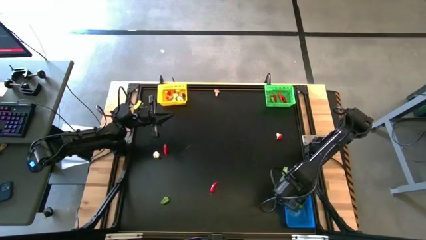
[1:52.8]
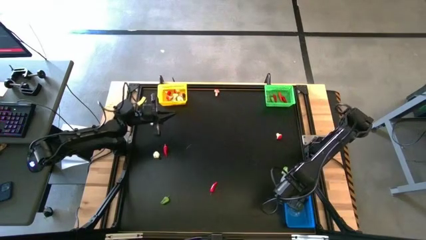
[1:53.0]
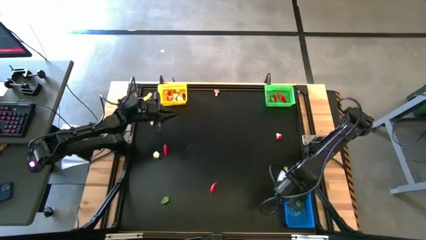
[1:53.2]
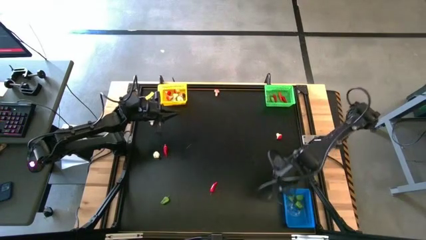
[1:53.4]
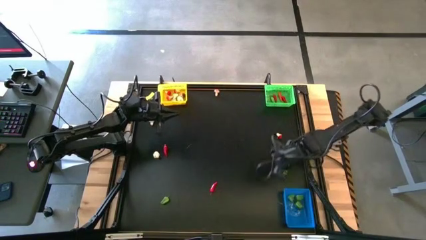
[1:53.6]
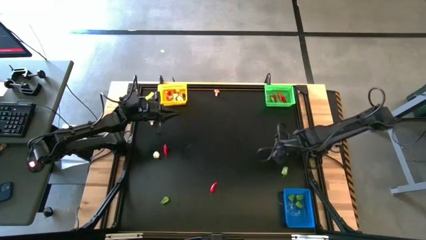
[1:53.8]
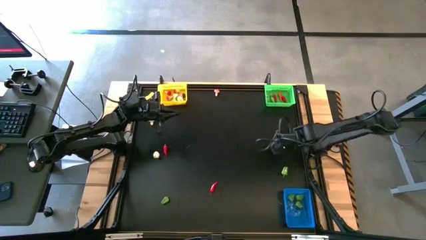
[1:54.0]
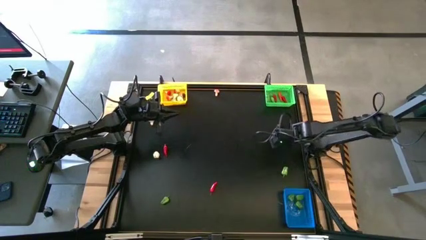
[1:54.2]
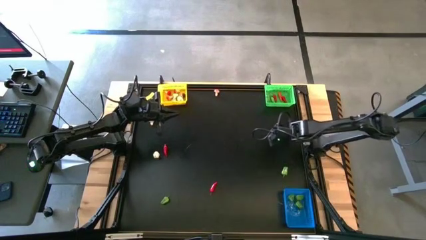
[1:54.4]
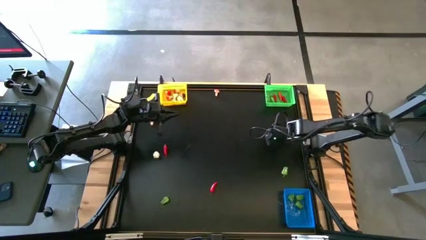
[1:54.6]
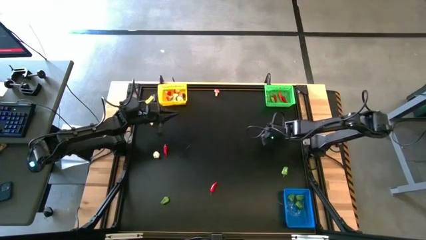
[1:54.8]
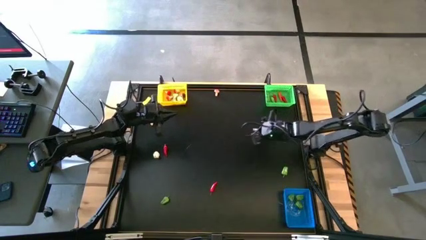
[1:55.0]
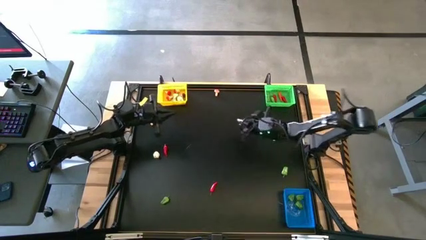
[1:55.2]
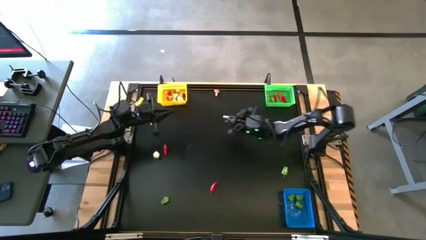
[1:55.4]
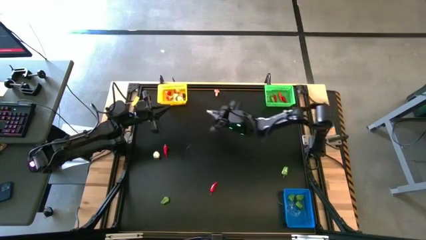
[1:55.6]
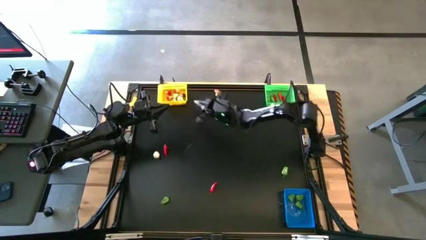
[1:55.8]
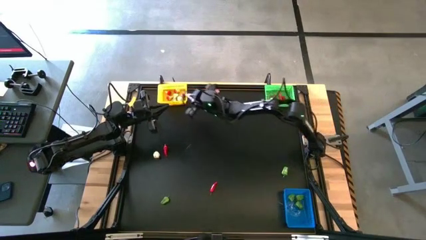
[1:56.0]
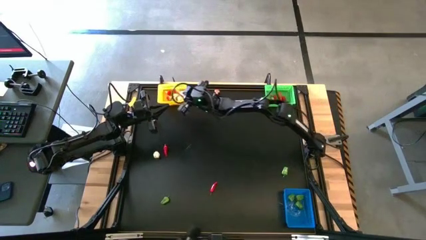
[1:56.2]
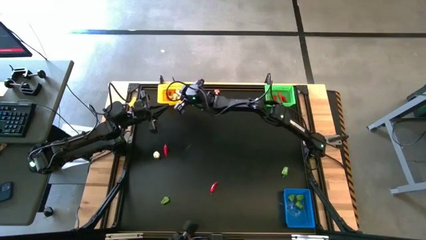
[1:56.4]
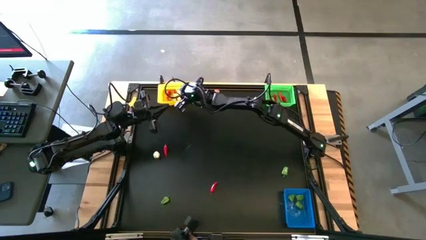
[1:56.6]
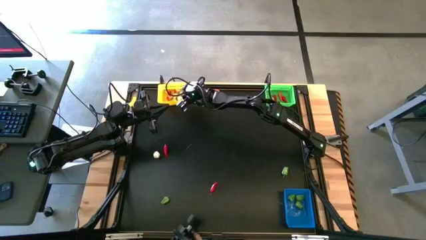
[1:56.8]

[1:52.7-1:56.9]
Task: Sort produce into baskets
Put the red mushroom into the yellow bin

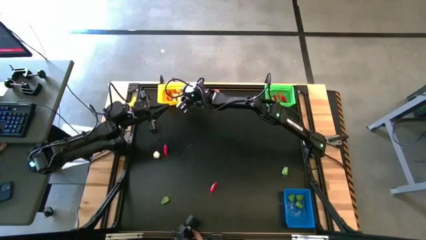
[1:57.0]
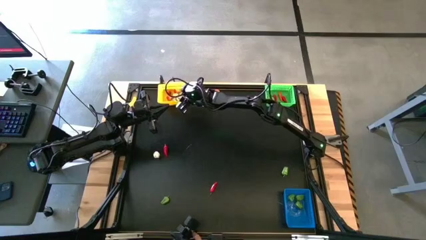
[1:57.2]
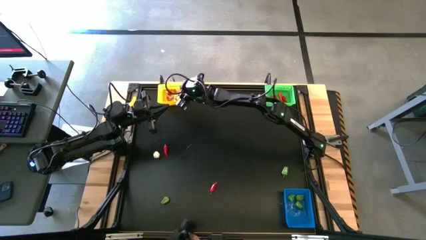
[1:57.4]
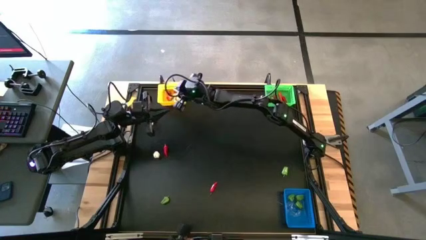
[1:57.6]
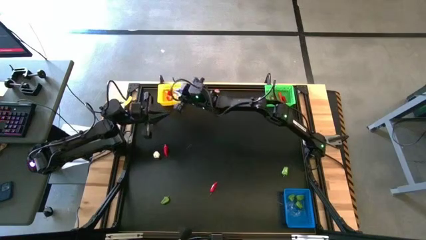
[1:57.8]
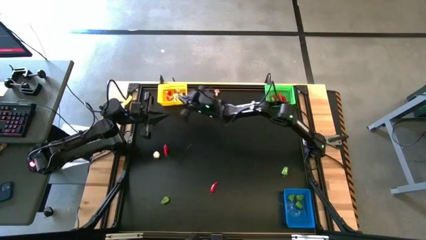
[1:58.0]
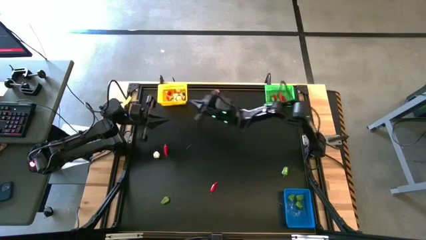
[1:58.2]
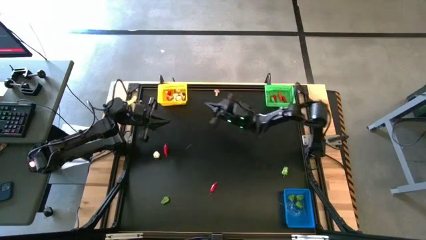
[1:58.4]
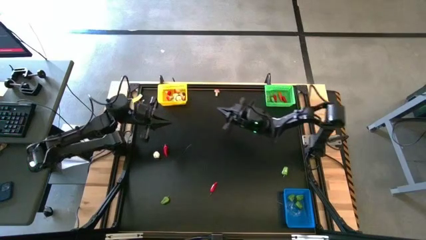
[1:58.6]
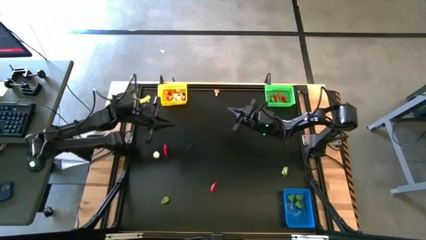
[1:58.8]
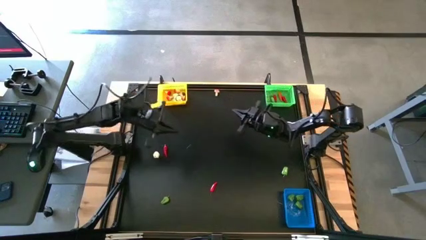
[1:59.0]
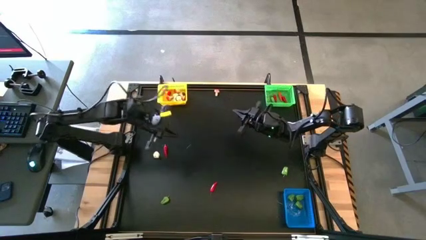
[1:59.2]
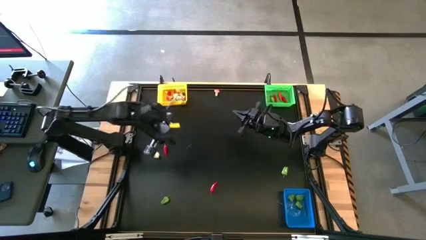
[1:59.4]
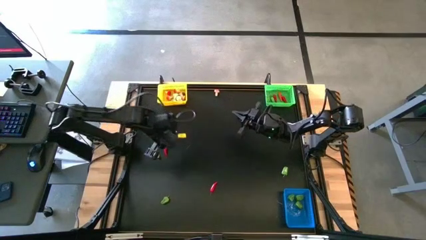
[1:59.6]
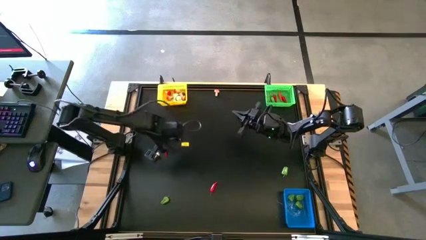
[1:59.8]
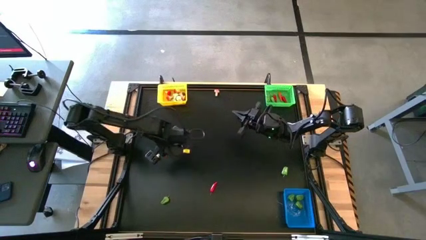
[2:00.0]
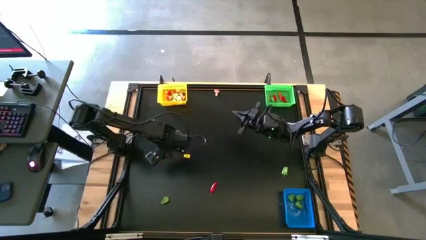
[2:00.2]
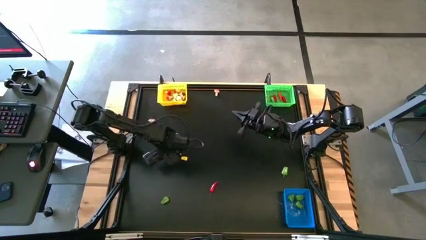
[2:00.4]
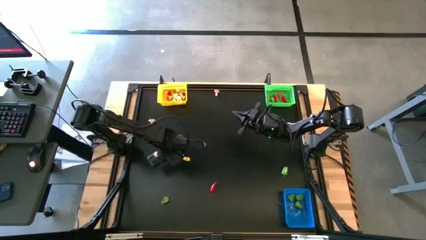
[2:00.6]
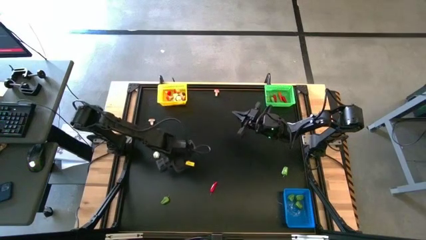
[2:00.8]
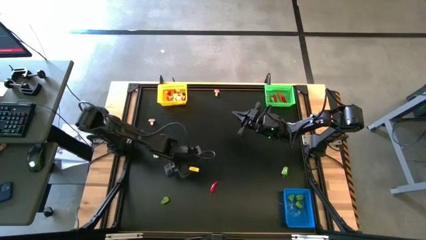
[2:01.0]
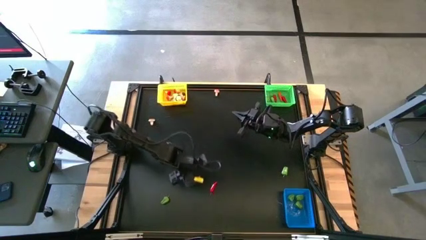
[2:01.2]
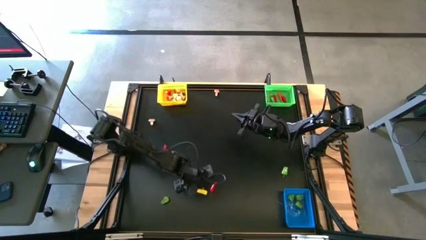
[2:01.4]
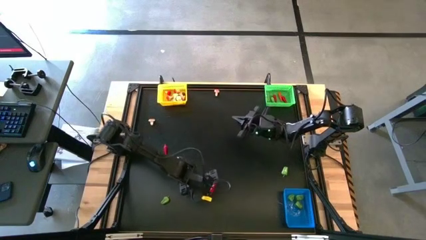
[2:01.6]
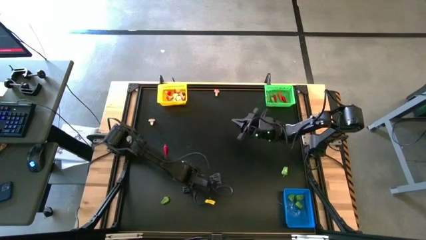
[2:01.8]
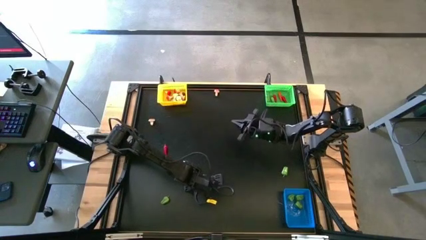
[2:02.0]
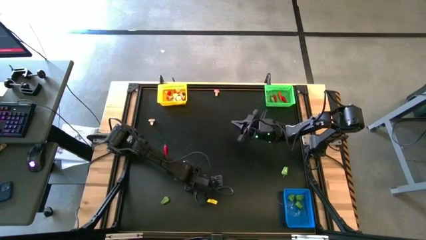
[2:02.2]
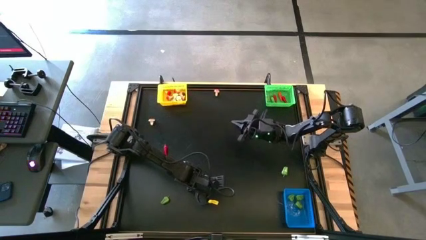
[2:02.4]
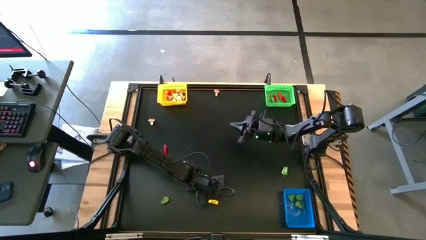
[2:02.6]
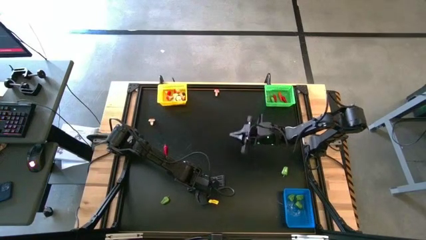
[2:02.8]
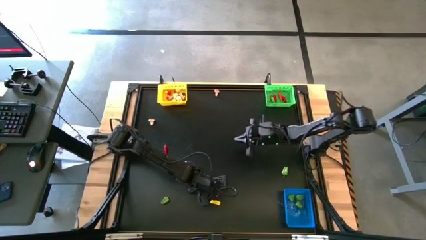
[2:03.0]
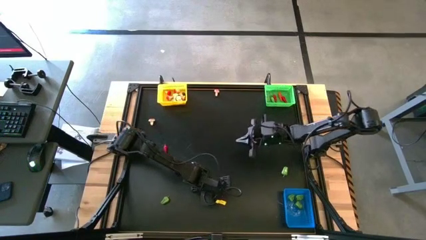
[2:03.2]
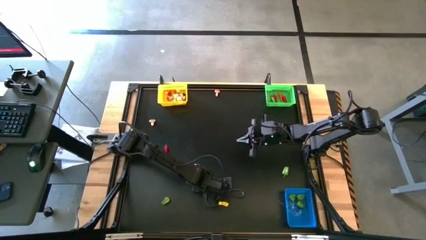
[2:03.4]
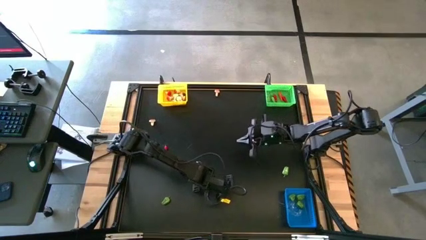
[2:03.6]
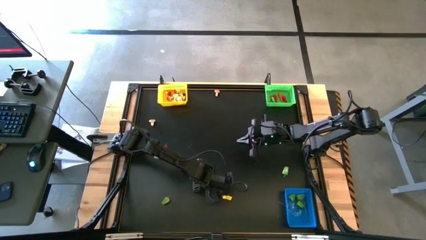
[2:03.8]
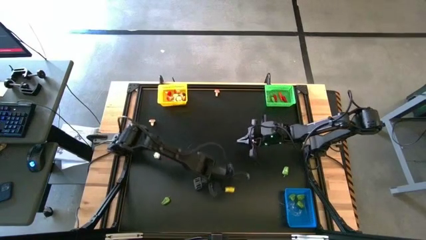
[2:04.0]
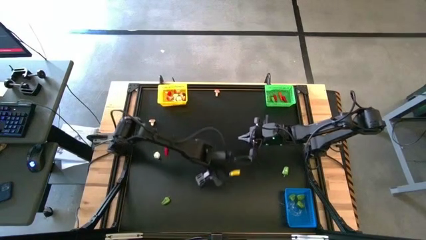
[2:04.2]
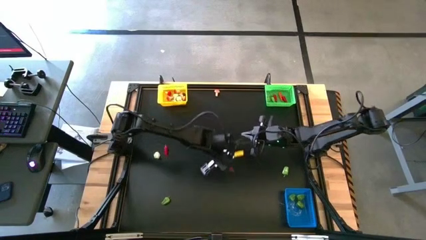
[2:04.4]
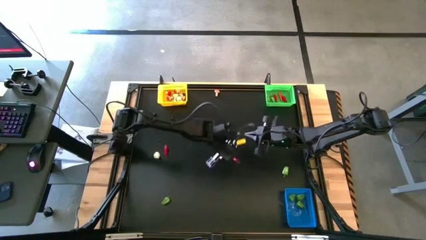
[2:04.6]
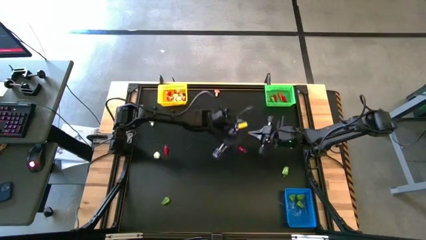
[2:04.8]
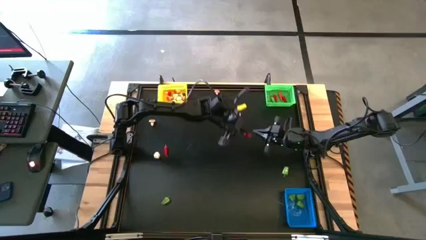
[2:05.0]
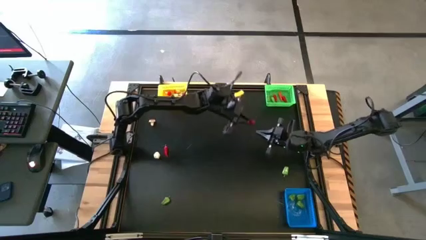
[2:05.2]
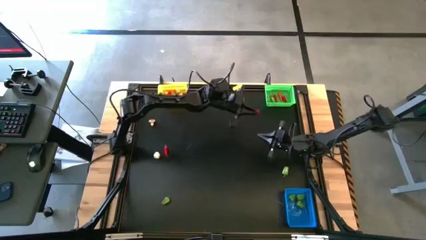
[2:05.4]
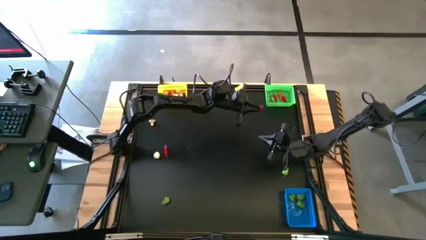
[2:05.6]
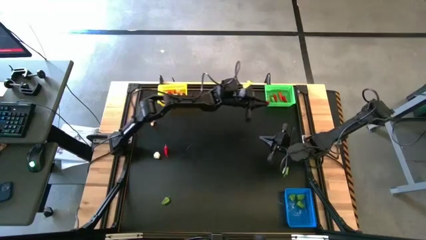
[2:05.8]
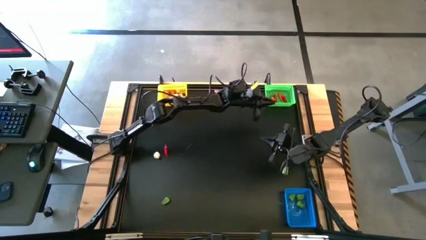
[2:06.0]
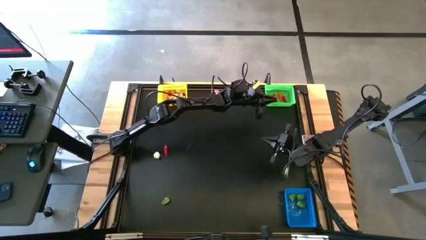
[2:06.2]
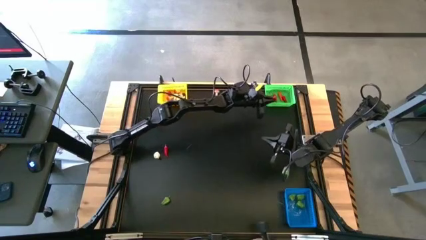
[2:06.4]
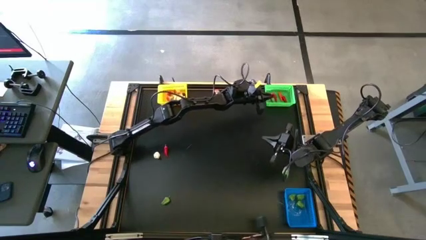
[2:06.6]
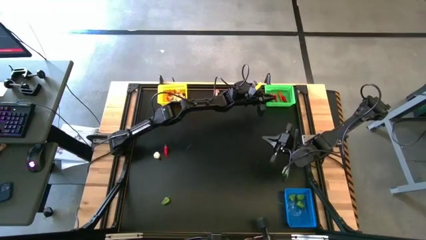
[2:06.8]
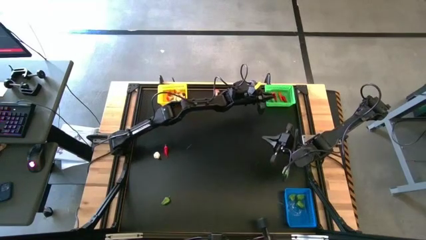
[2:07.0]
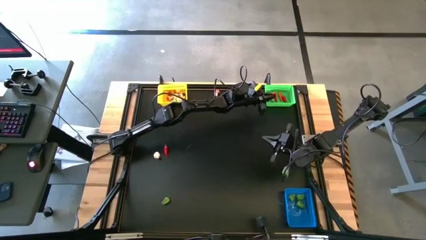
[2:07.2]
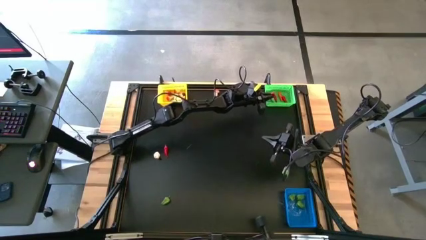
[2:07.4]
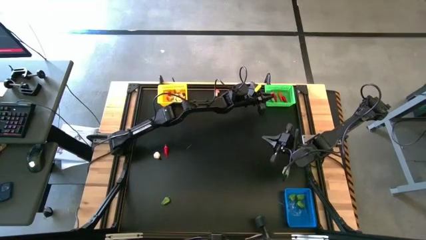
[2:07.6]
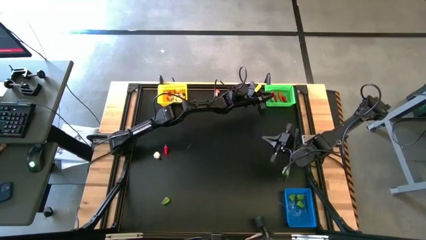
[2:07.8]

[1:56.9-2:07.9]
Put the red chili pepper into the green bin
